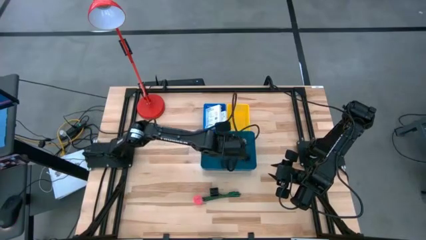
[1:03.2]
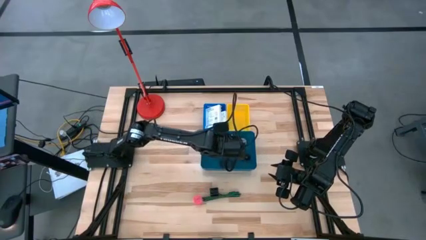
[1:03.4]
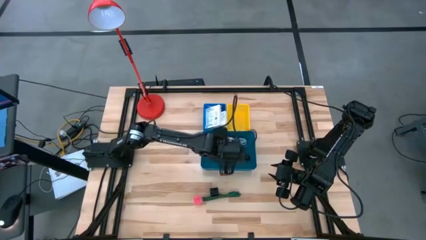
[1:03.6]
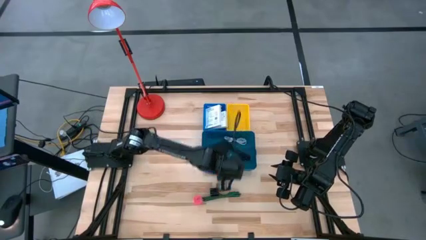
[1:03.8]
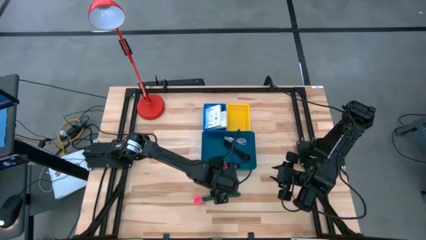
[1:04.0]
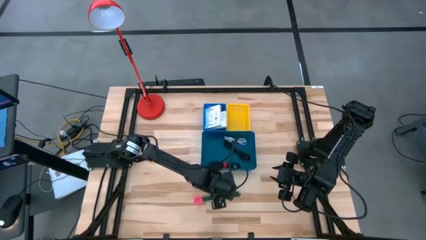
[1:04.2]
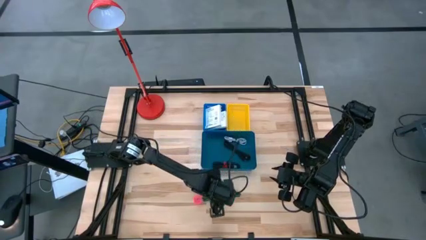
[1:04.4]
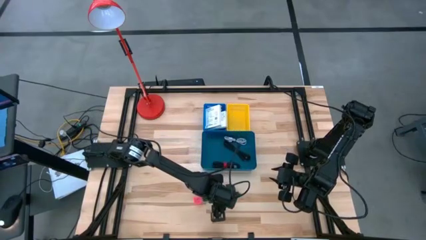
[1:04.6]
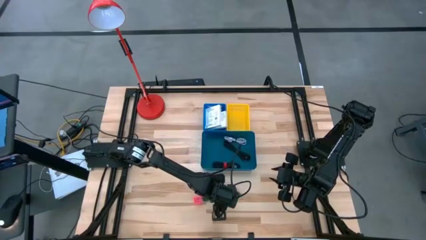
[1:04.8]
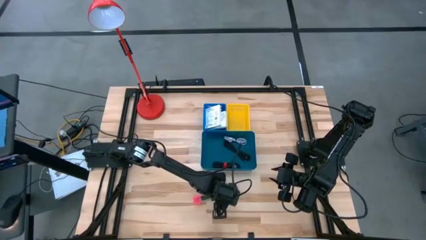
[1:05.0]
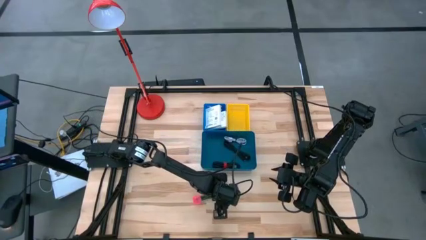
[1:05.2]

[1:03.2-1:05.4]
Task: Pick and place items into bin
Put the green charger cable into the large blue bin

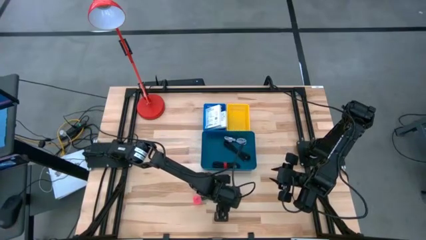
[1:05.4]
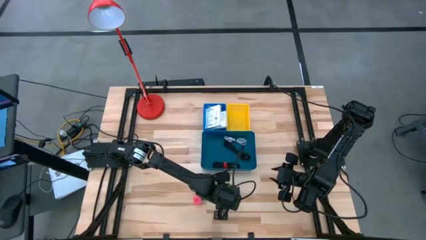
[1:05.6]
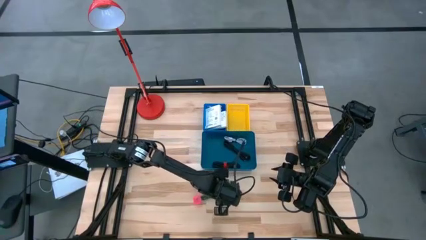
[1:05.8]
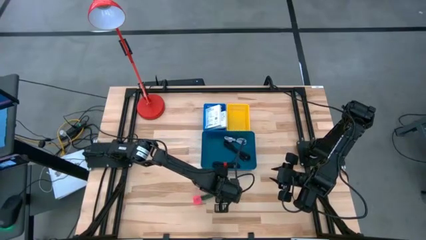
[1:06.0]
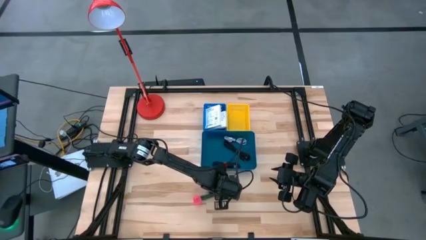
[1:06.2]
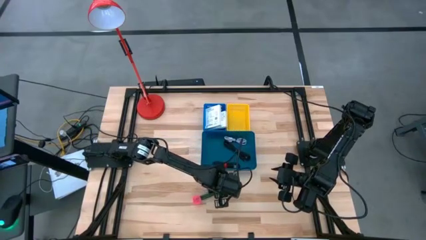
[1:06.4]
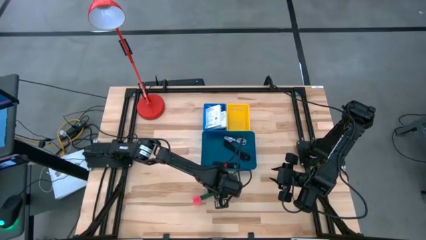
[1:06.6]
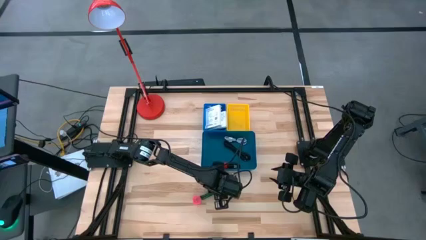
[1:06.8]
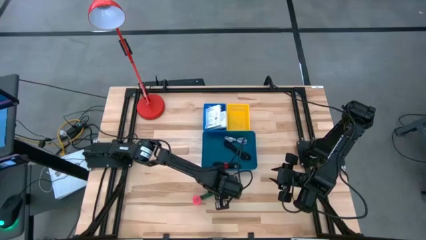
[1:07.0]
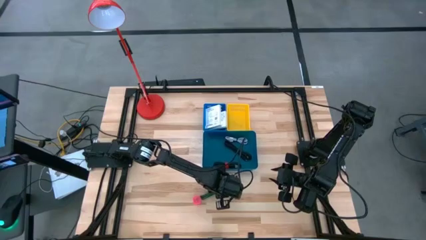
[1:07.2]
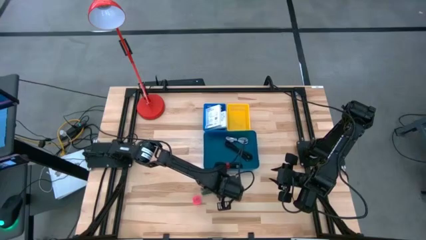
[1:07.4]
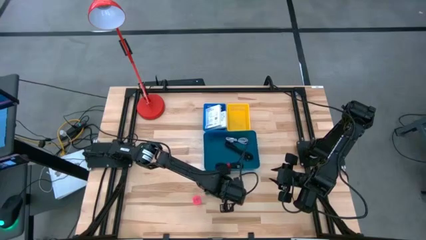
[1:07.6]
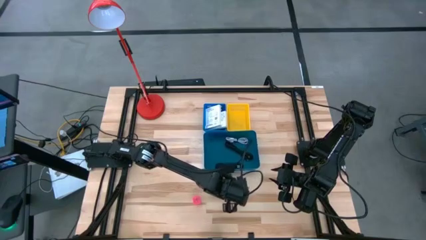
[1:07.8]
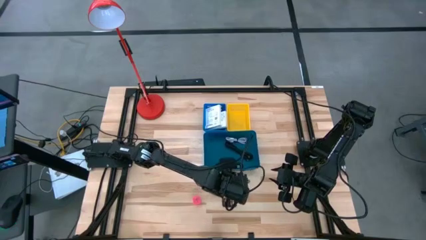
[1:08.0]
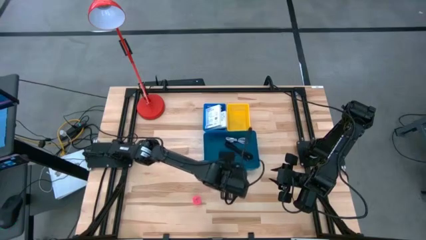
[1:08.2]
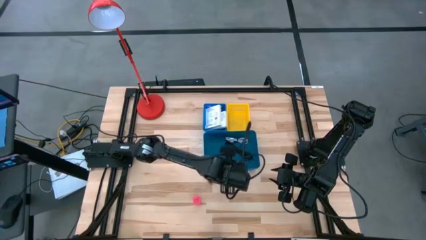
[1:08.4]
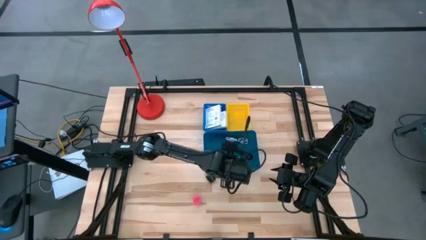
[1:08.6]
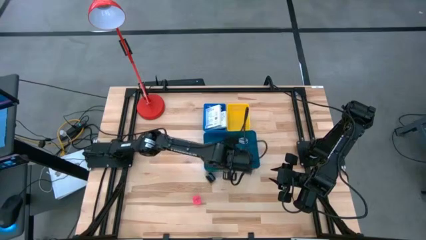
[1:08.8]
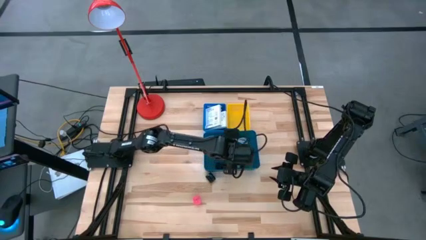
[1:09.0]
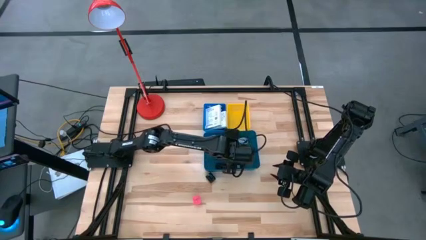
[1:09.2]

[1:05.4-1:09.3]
Put the green charger cable into the large blue bin

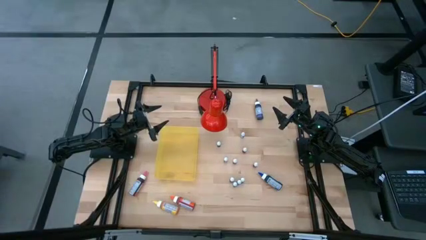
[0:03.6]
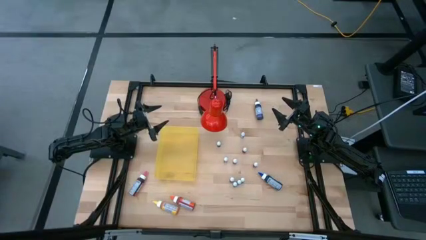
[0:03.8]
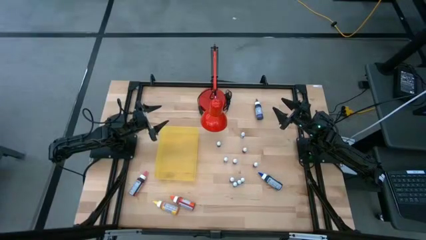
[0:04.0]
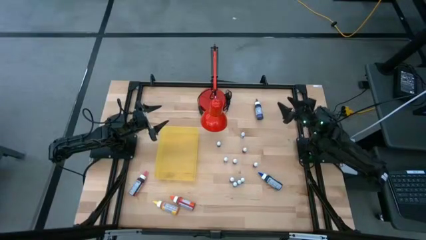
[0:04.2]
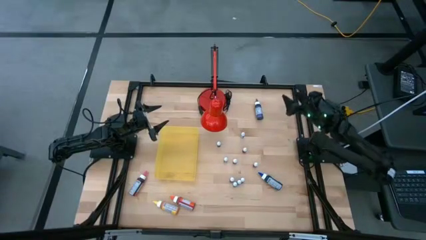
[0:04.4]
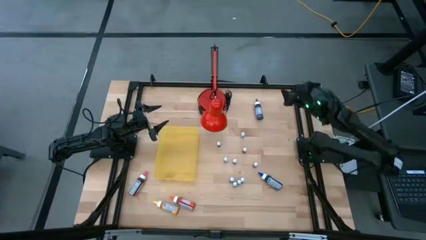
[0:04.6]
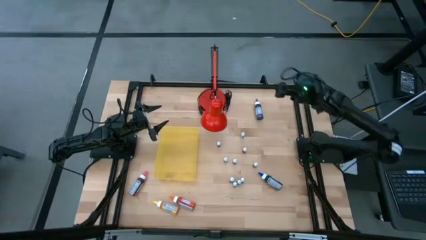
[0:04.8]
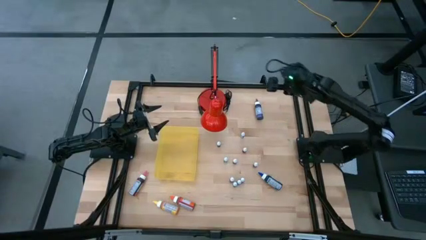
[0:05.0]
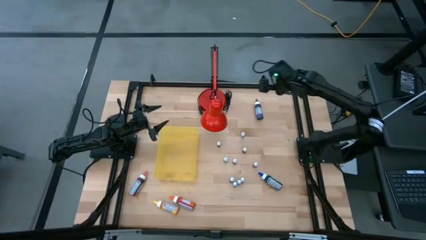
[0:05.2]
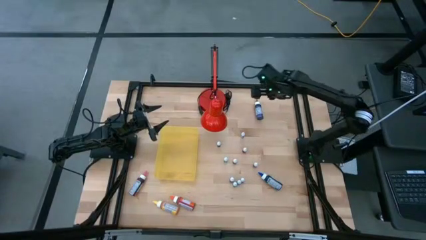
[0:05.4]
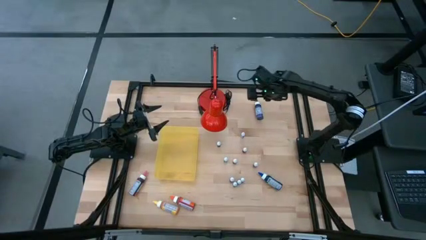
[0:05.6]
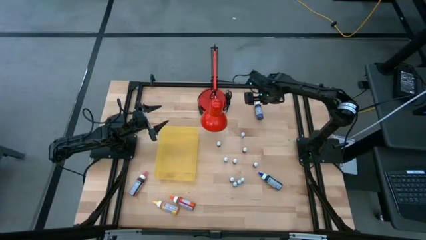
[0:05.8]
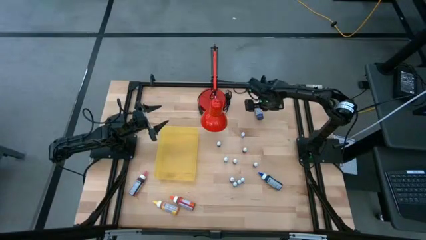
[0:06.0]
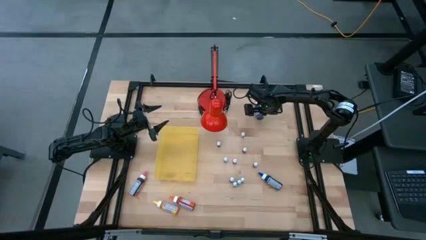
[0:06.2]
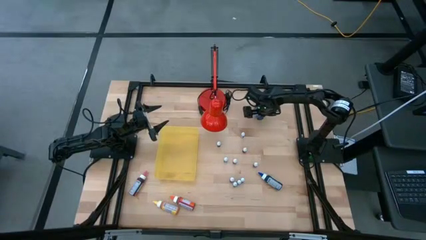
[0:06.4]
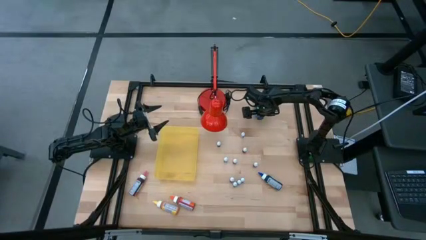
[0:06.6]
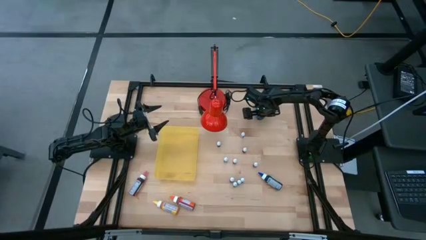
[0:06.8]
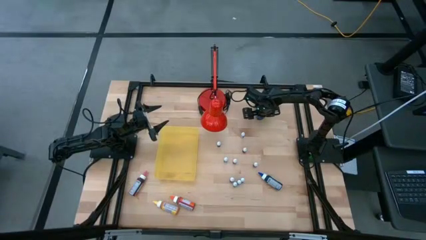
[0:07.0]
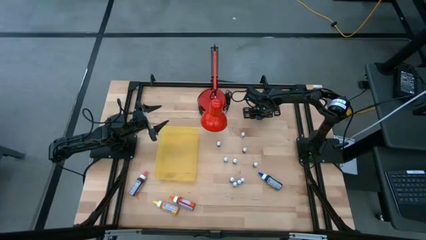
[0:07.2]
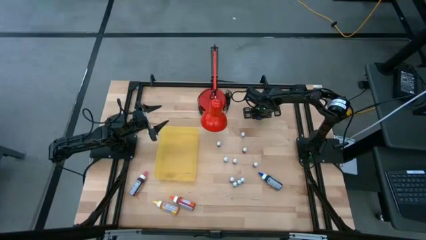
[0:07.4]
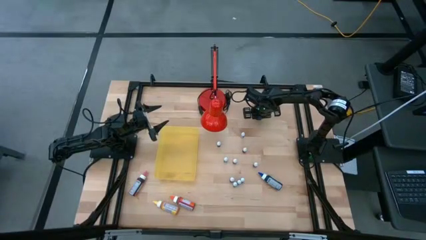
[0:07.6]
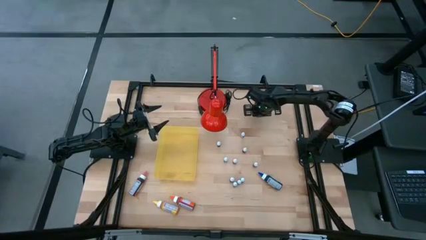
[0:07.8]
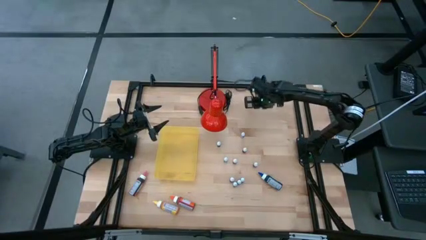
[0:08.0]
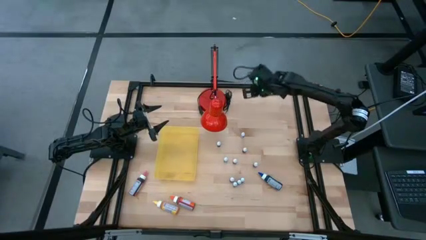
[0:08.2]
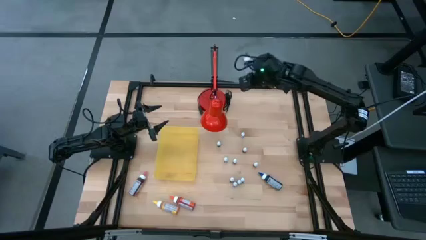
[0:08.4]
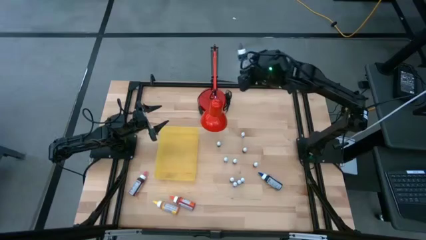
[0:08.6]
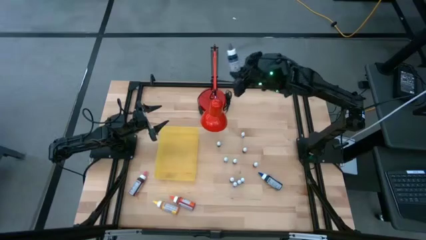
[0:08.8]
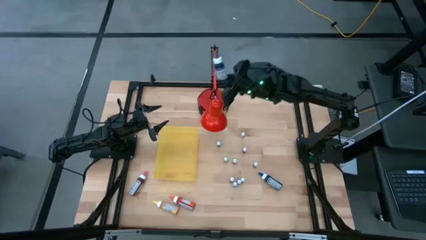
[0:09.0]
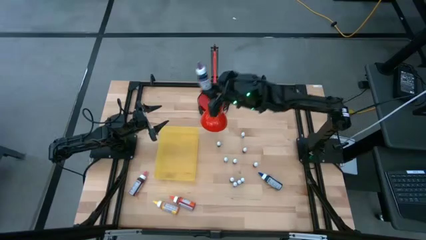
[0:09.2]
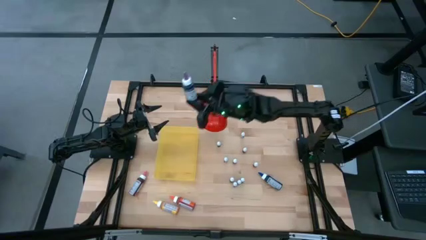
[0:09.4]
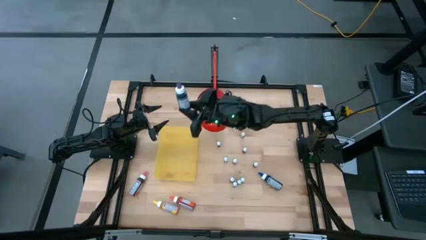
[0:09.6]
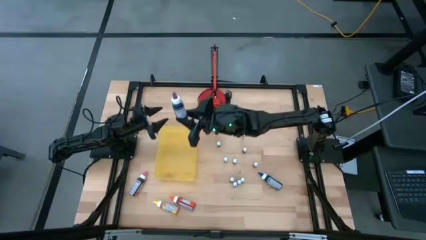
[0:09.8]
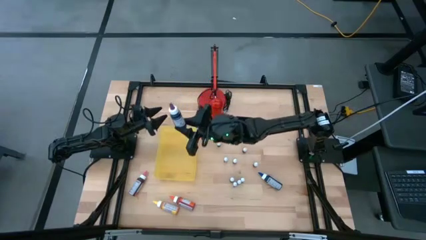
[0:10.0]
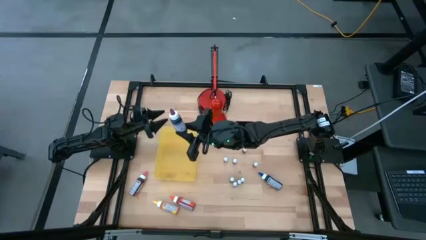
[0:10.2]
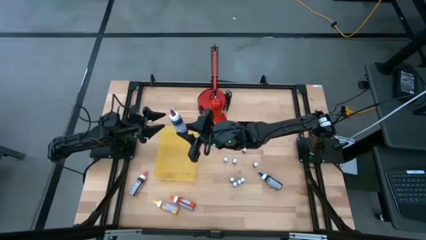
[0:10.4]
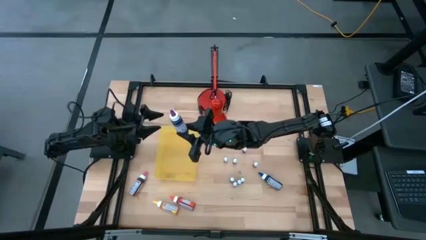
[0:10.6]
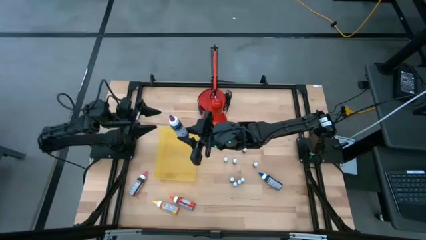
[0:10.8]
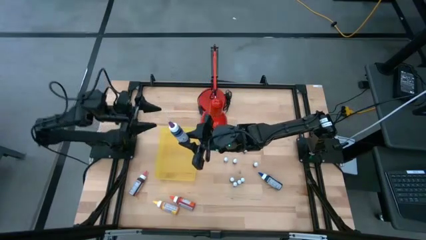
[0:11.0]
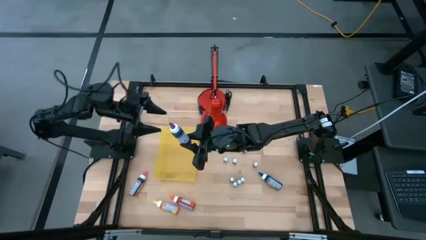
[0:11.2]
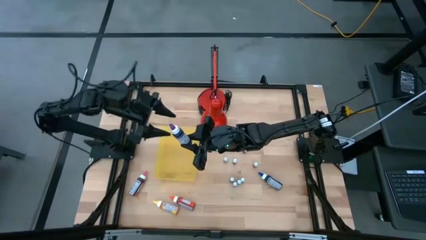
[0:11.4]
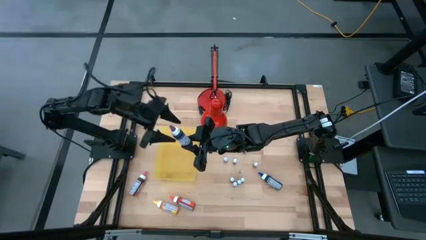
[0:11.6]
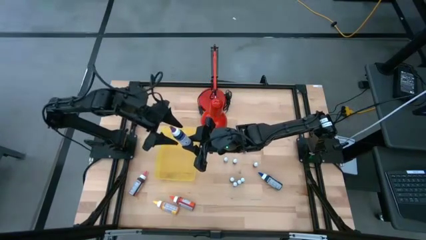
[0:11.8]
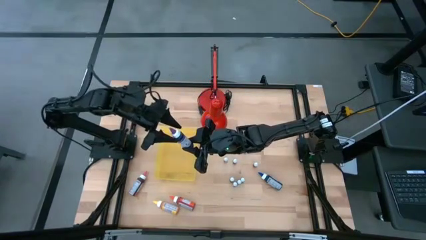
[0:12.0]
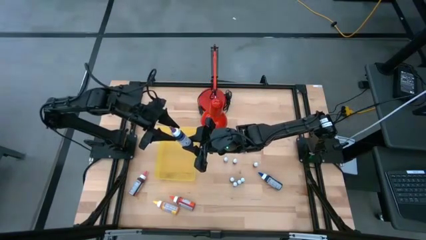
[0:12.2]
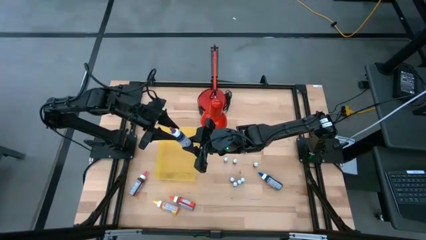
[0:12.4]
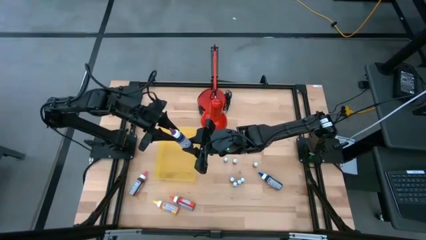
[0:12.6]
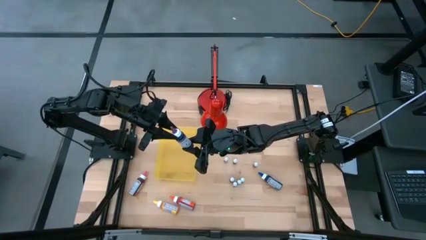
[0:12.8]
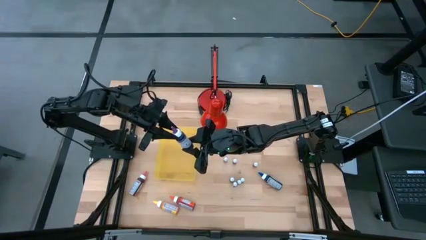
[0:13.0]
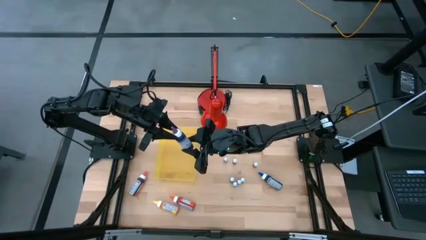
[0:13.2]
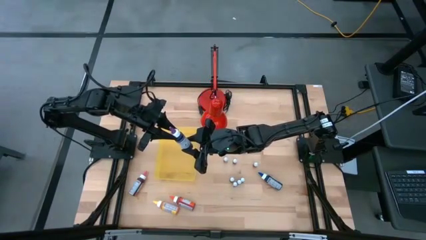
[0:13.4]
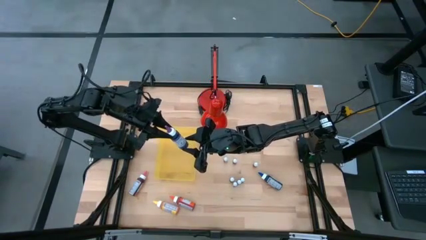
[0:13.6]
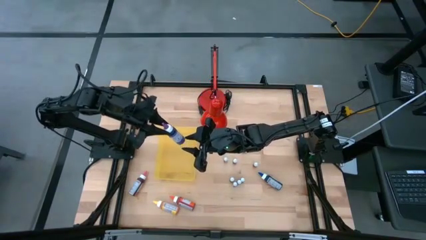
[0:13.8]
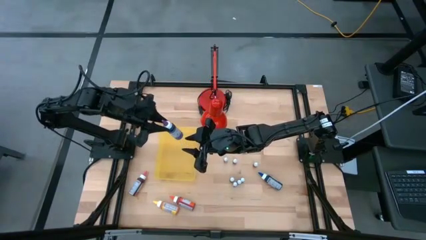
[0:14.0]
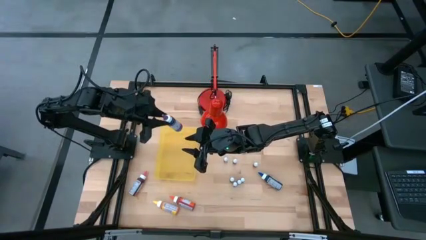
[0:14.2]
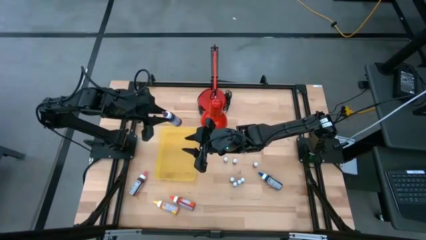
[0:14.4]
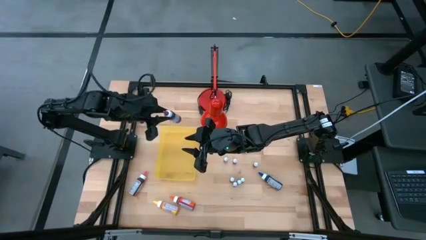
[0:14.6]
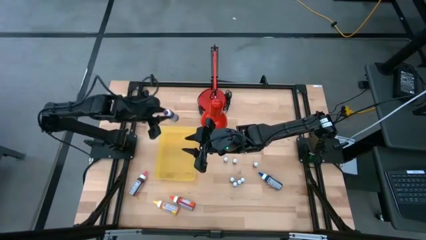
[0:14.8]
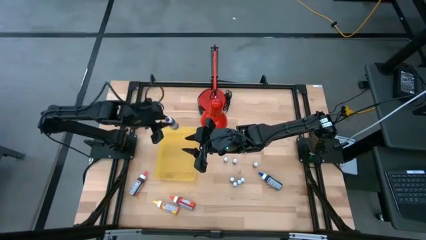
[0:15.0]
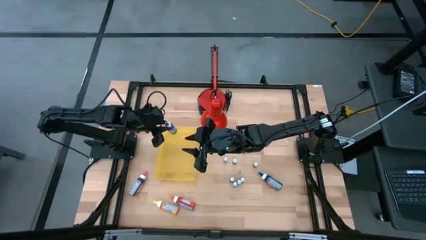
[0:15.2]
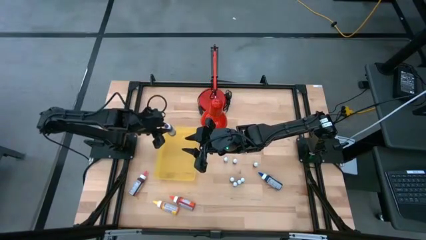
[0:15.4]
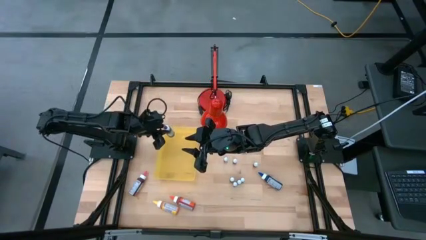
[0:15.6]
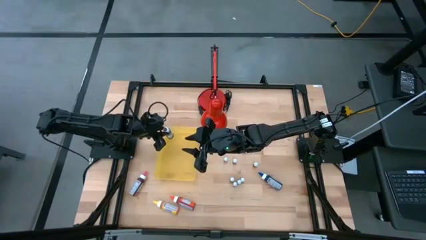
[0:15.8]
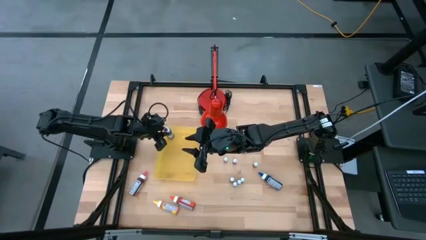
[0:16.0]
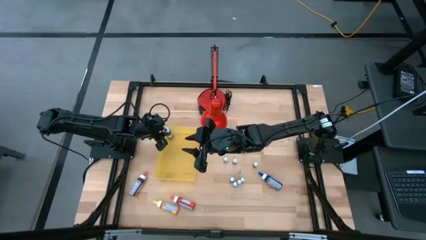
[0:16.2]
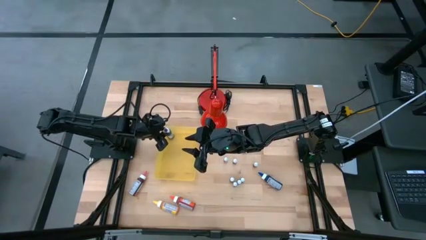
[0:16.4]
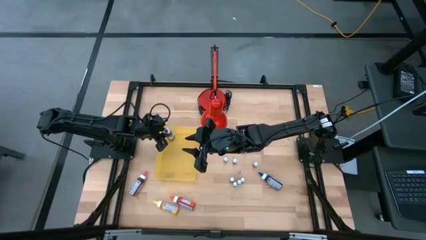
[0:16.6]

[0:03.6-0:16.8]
Task: Pick & Place food coloring
Put the large violet food coloring bottle into the yellow bin
